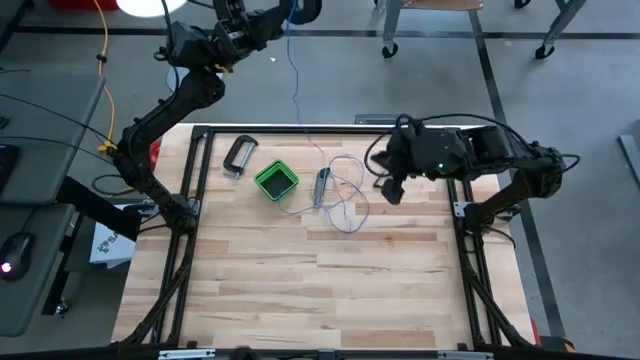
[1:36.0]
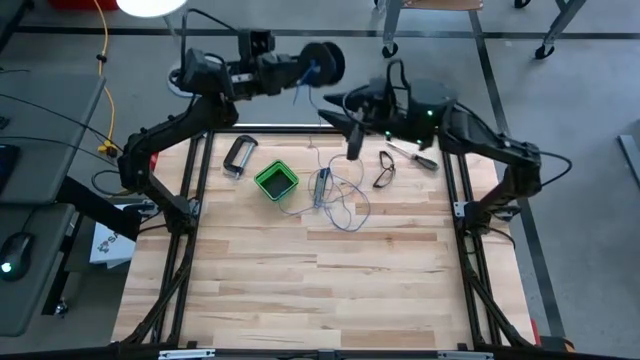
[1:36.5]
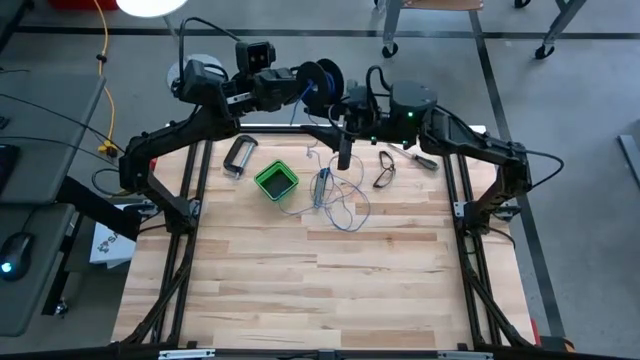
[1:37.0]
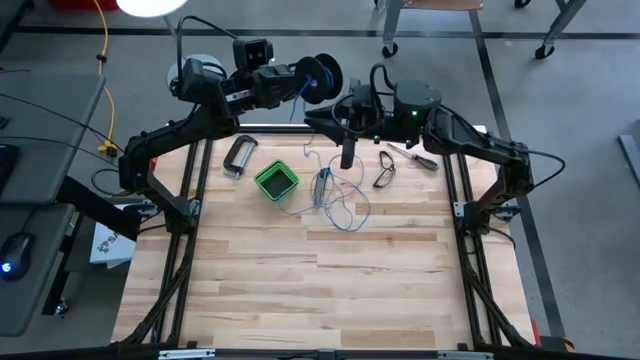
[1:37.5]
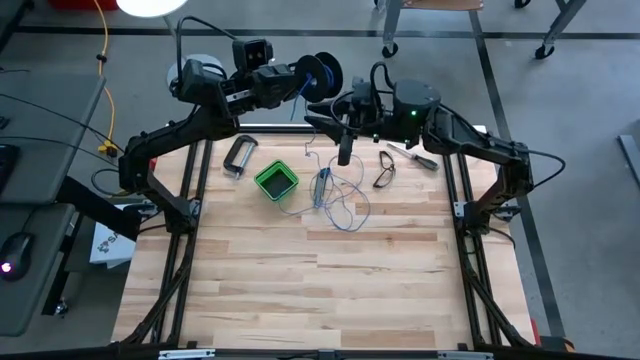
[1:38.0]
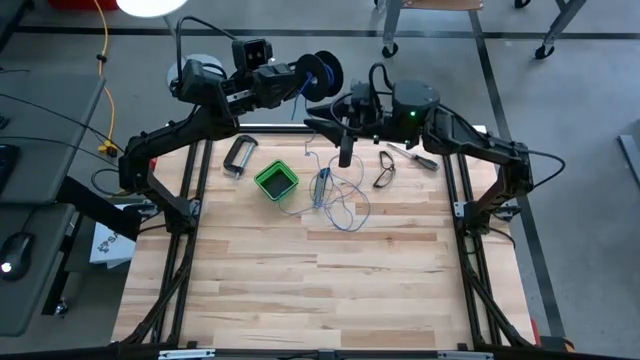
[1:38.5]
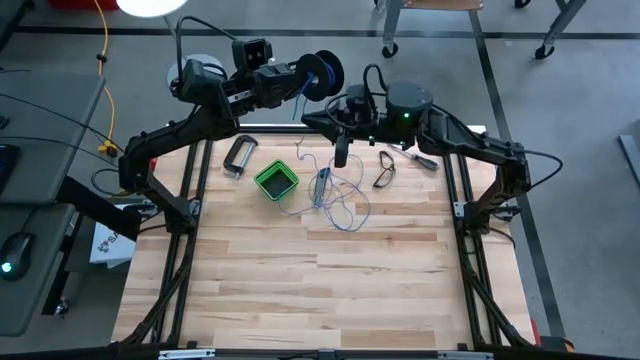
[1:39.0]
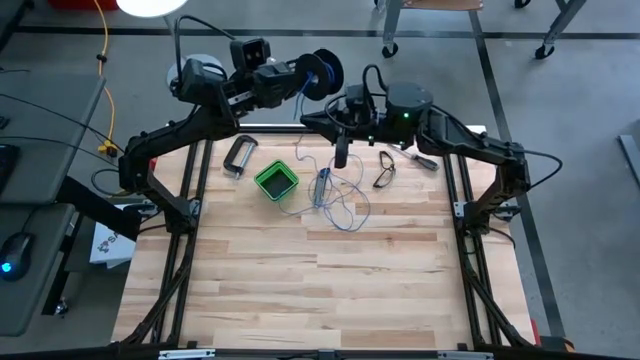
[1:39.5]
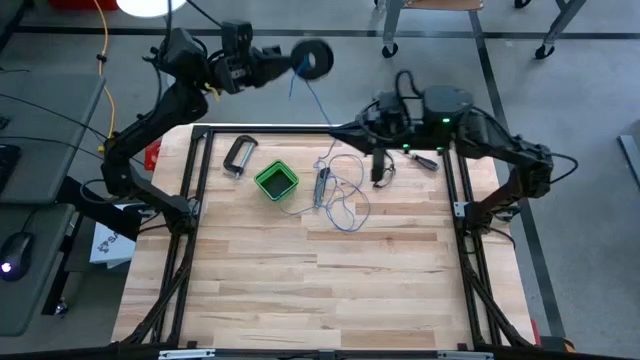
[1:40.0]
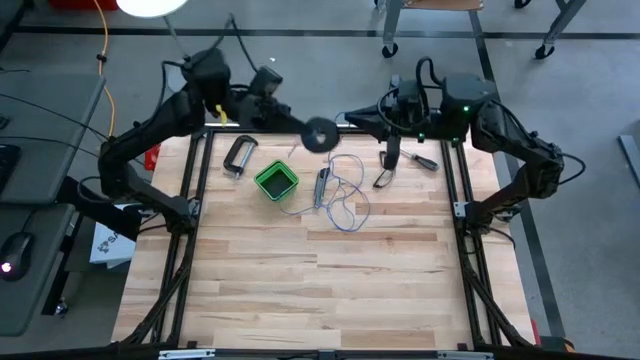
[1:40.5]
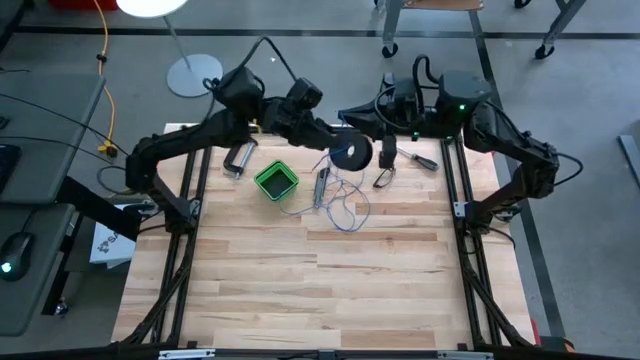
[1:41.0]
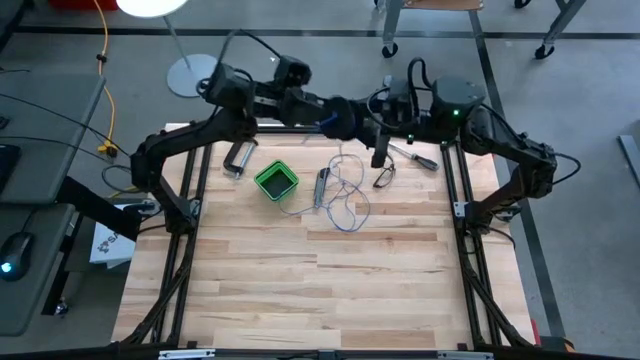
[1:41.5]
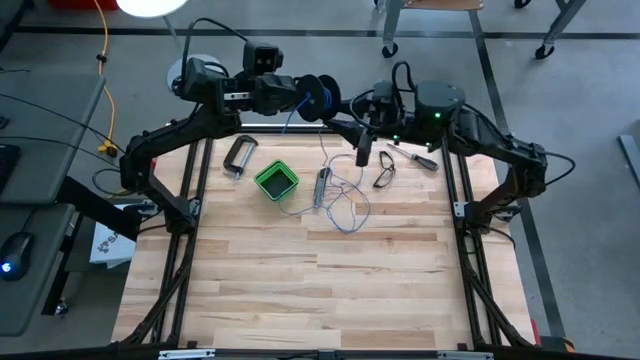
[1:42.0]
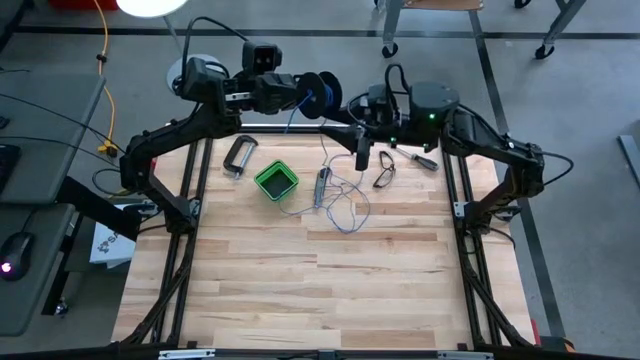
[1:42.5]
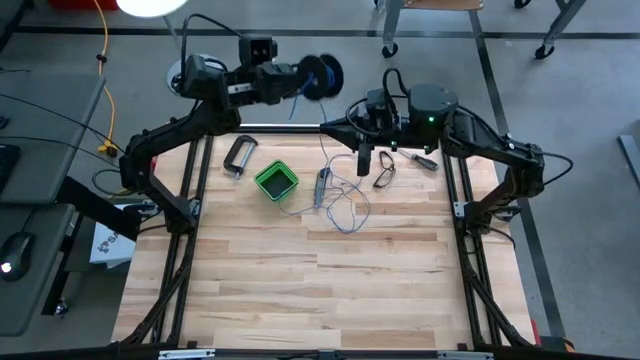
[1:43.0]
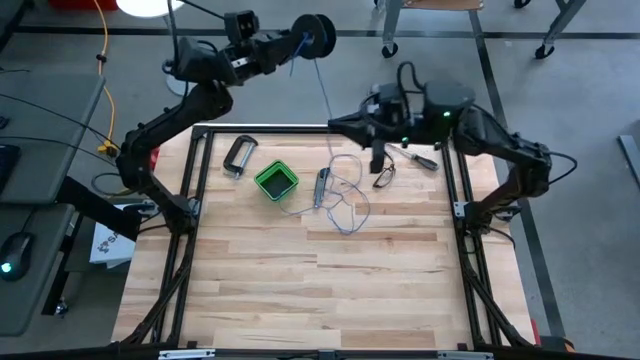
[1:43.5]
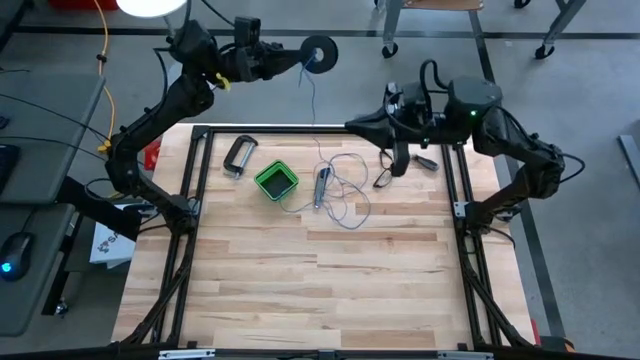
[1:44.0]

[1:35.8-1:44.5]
Task: Coil cords
Coil the blue wire onto the spool

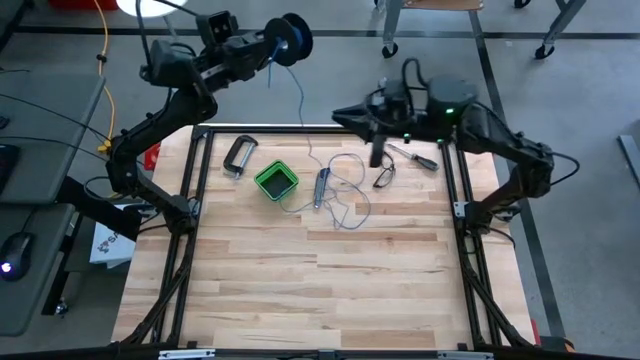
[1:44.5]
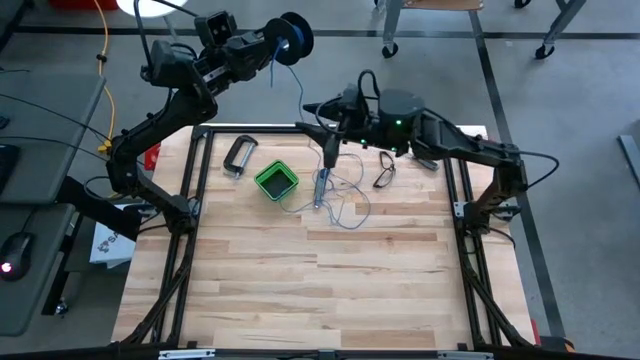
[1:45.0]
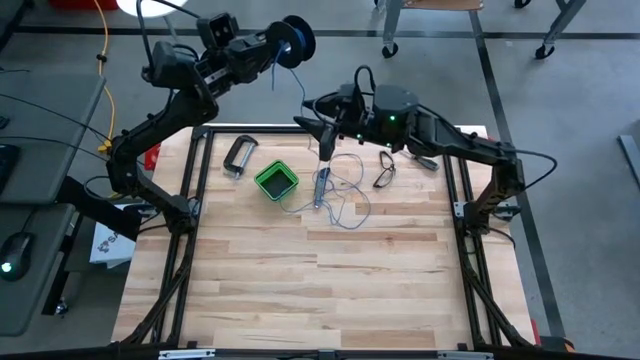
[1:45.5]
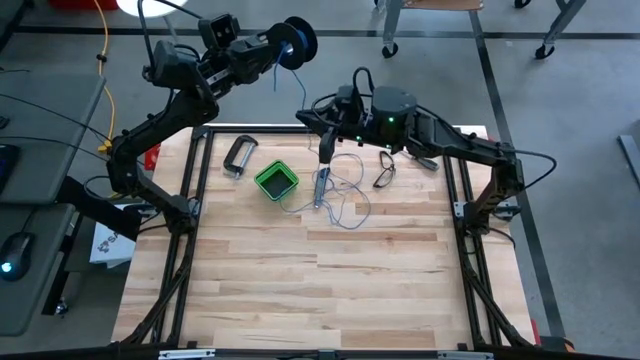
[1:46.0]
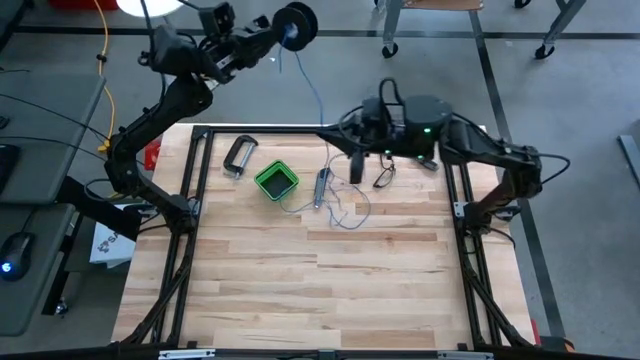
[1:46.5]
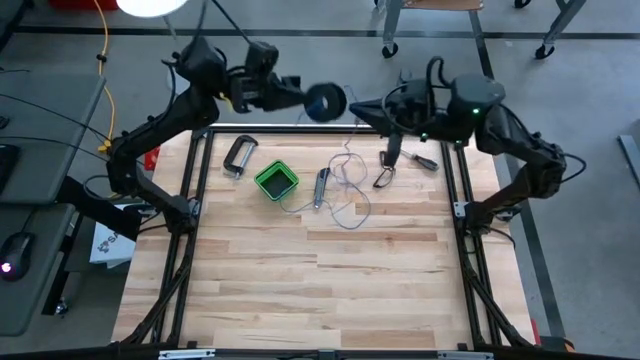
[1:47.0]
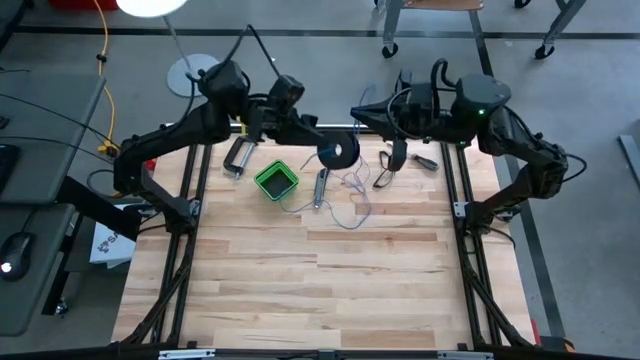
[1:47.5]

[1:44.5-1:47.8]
Coil the blue wire onto the spool

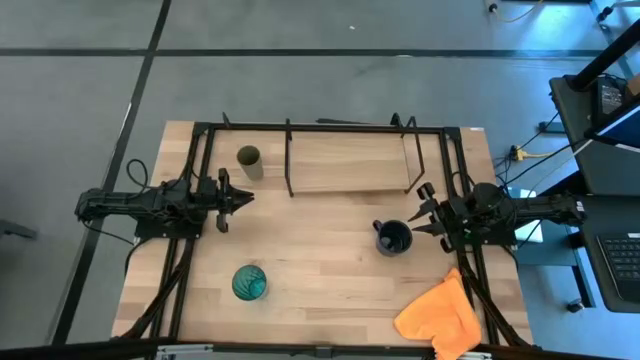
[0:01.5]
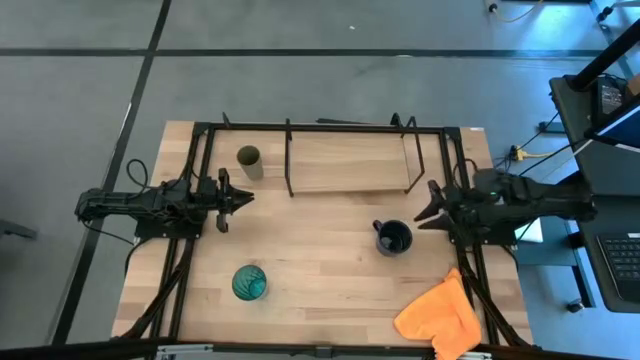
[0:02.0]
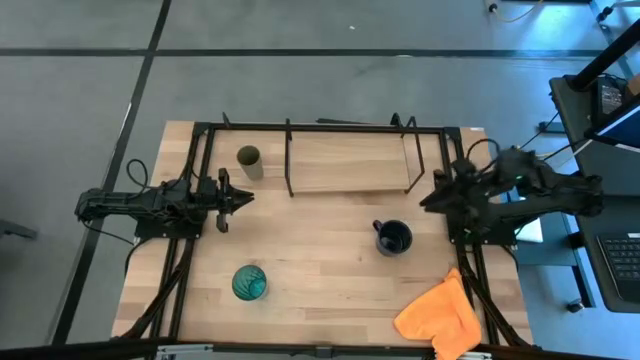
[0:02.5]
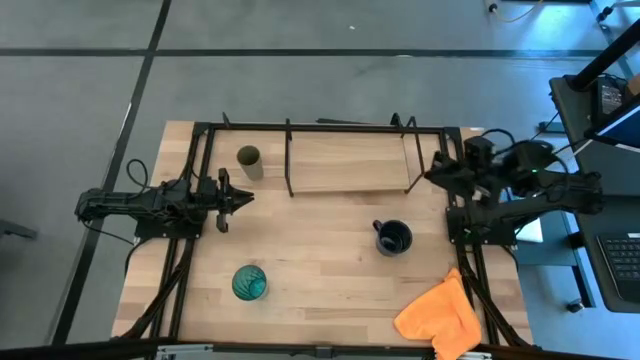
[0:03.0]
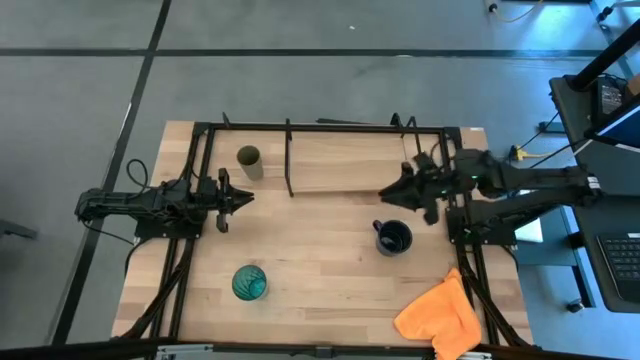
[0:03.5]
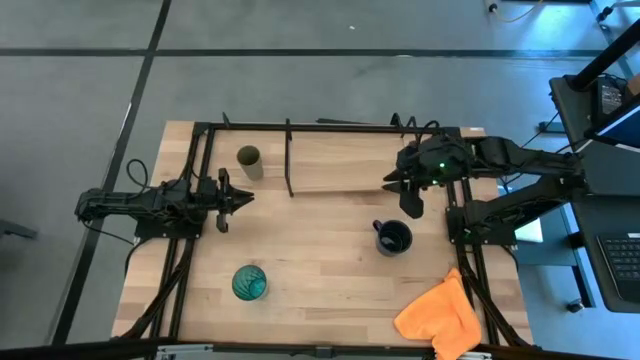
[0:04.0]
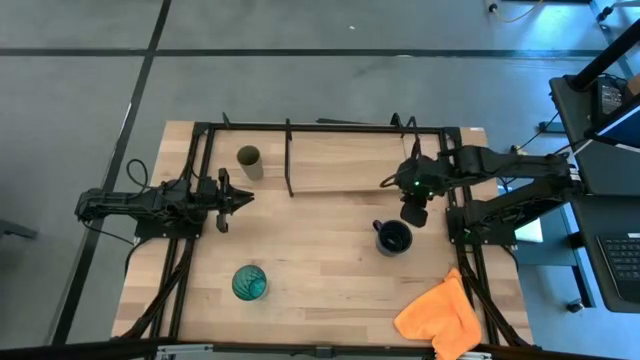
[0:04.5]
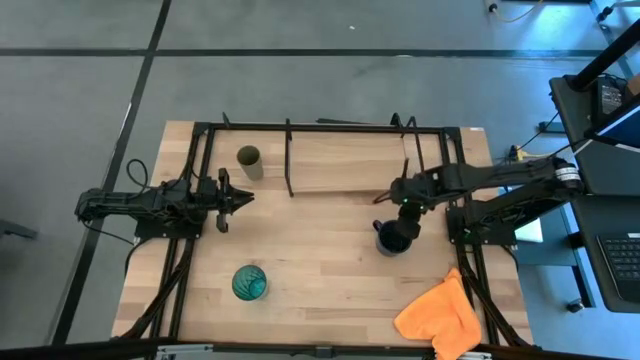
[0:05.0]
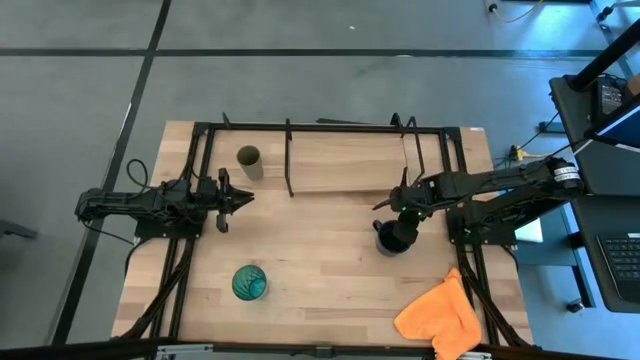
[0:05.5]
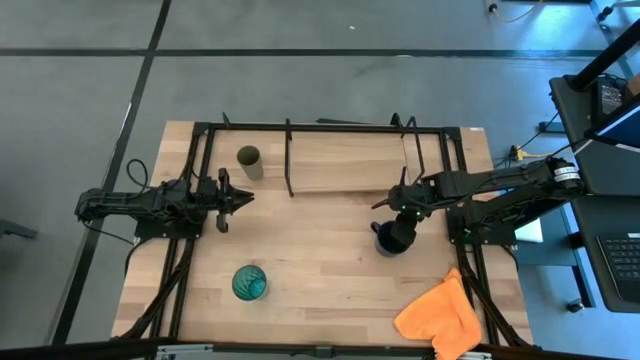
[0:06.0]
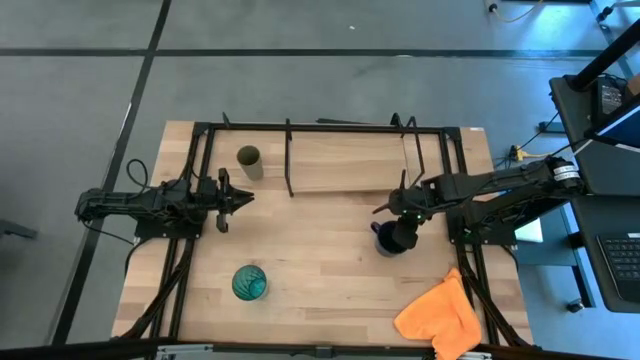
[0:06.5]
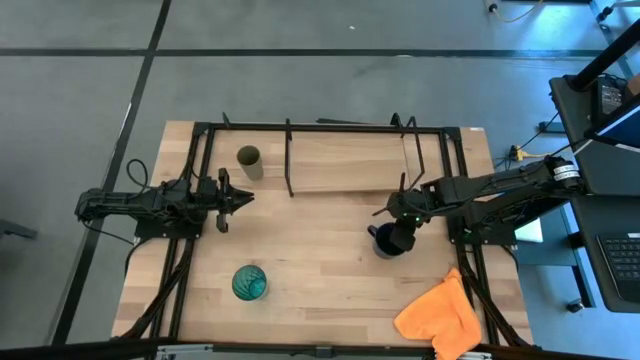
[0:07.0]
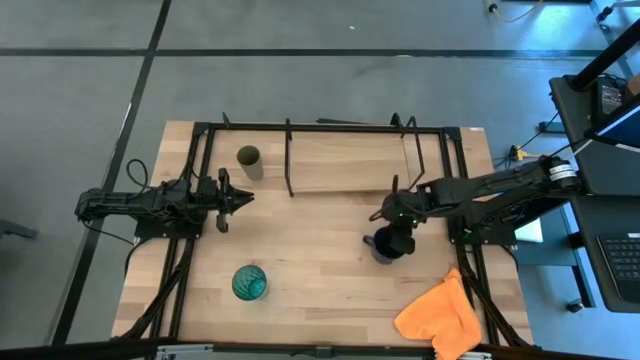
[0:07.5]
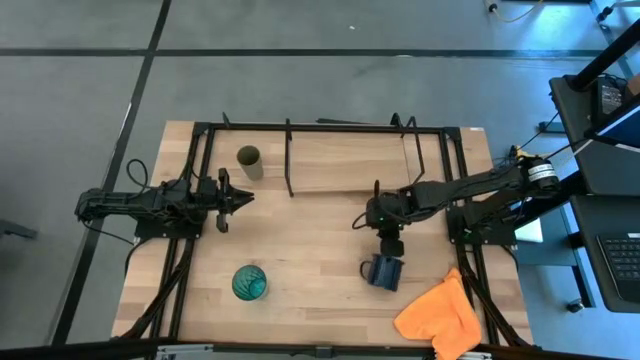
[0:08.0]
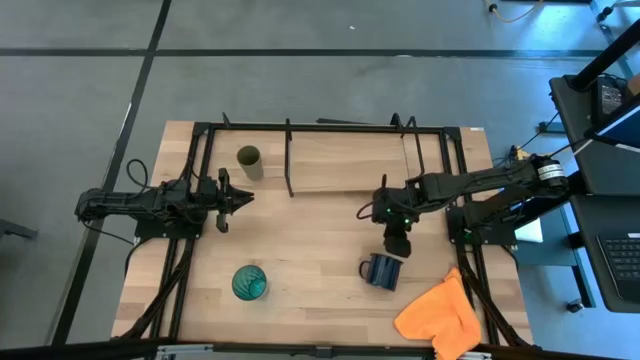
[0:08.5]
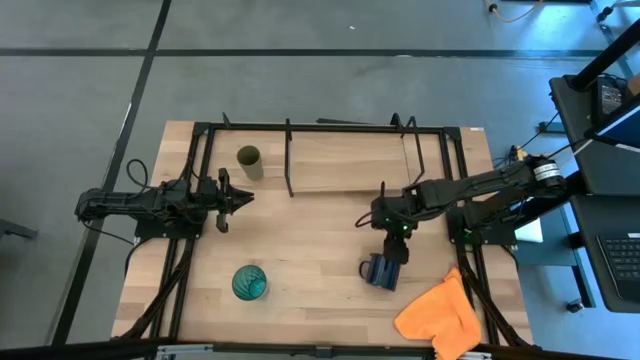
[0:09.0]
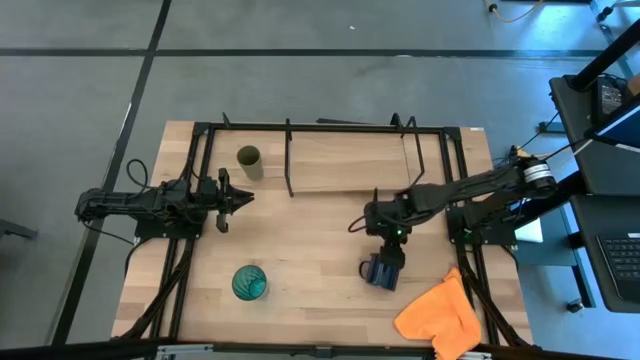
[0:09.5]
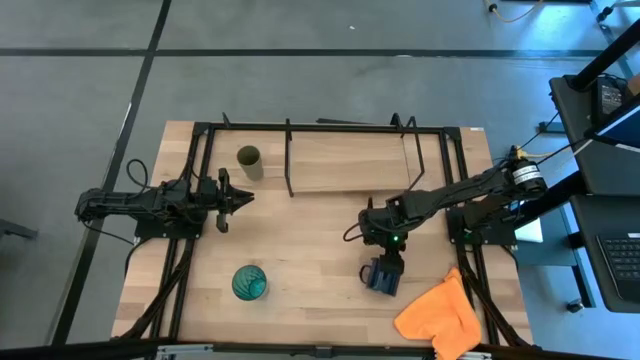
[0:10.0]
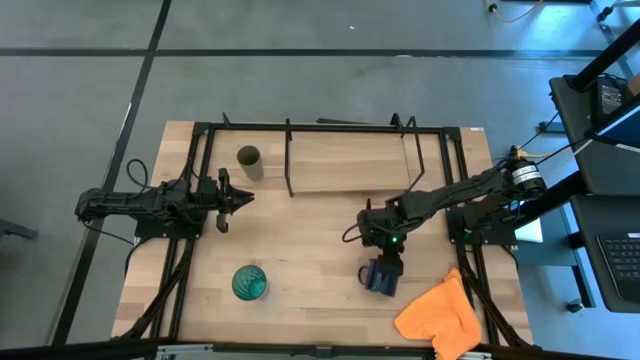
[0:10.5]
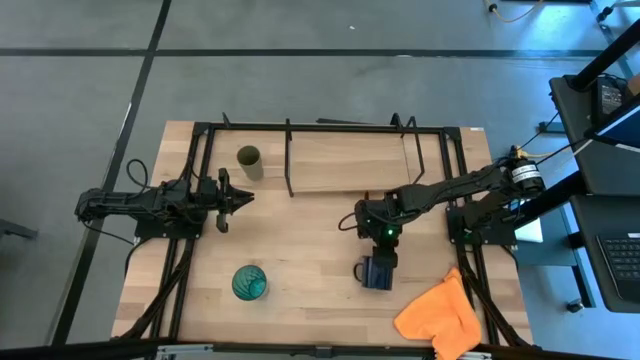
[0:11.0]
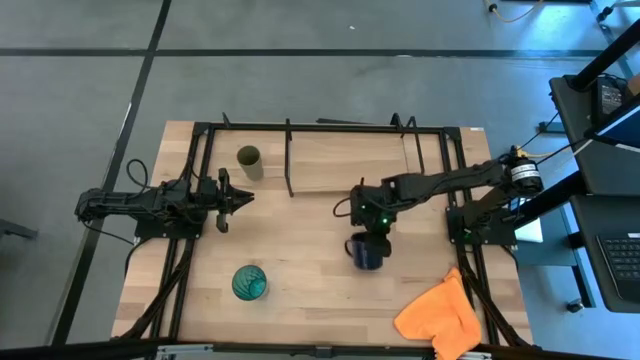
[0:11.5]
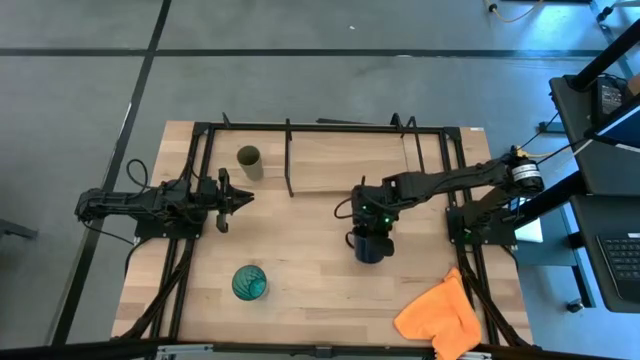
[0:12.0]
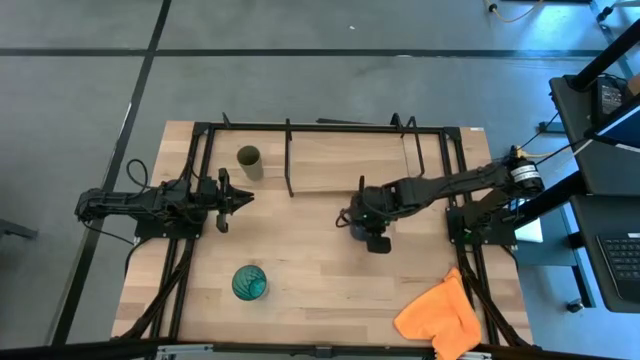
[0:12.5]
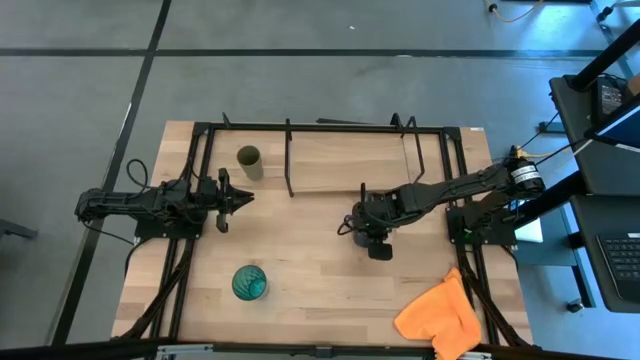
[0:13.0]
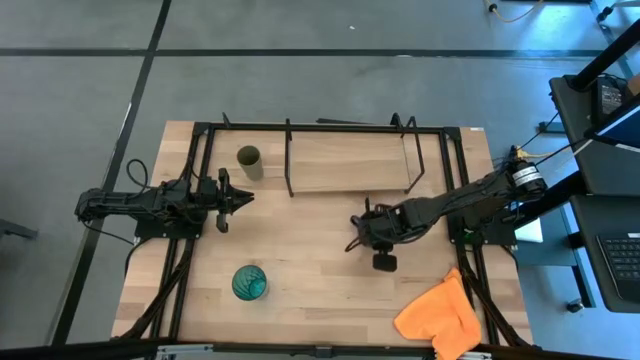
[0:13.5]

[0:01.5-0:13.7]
Task: Stack small to large cups/mugs on shelf
Put the blue mug on the shelf
